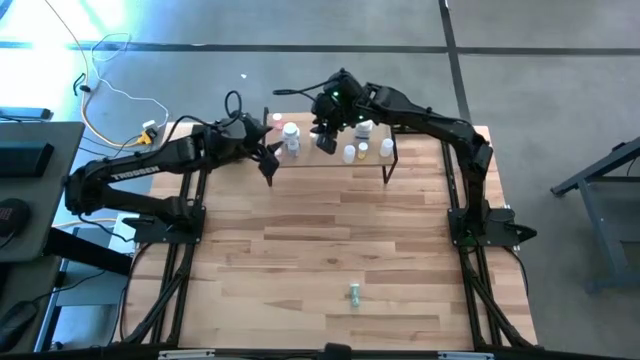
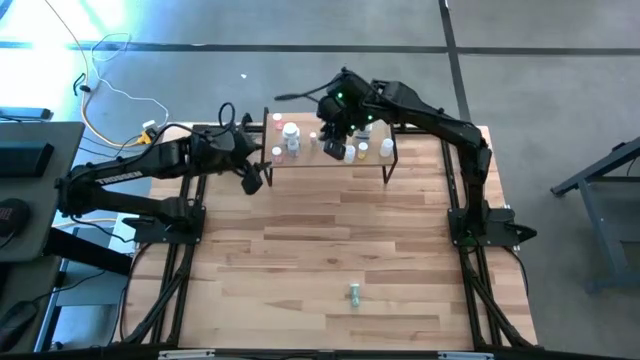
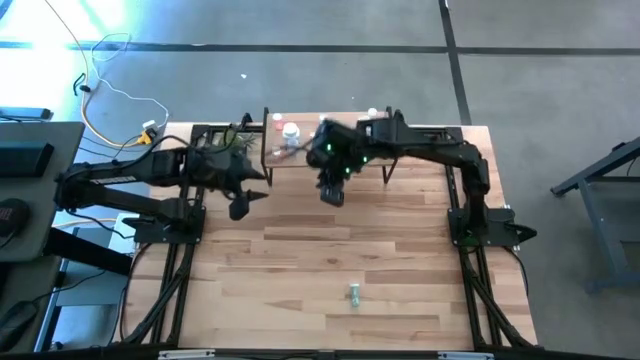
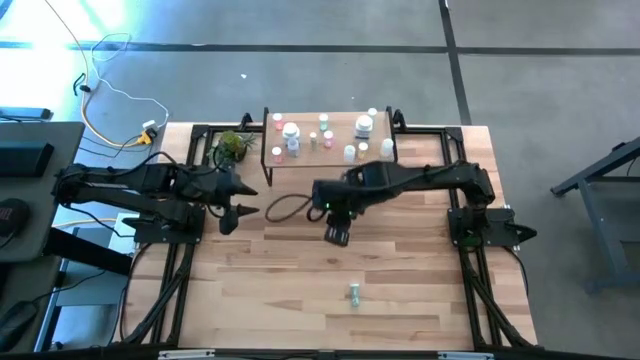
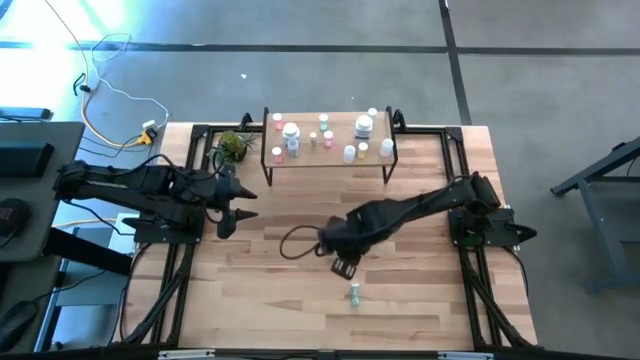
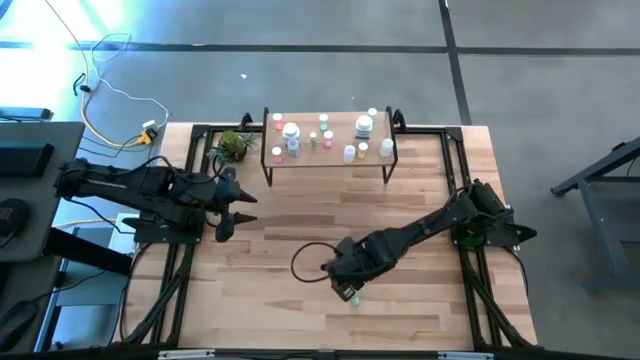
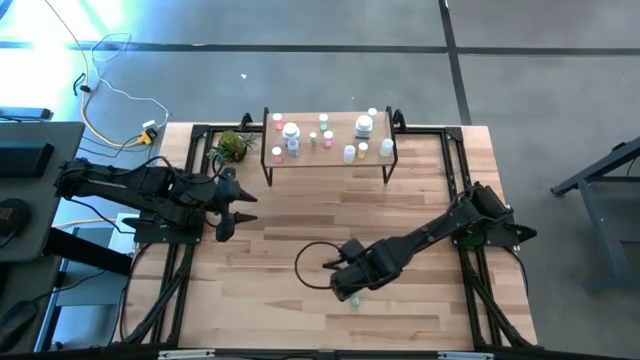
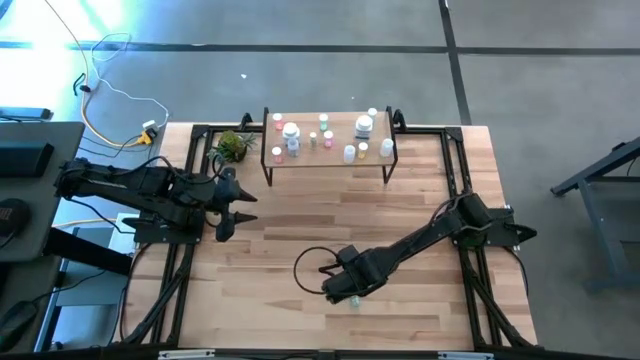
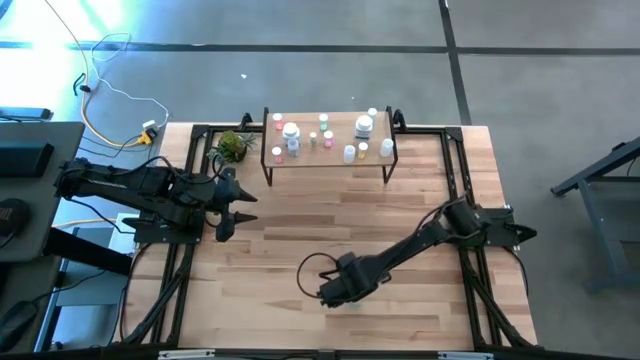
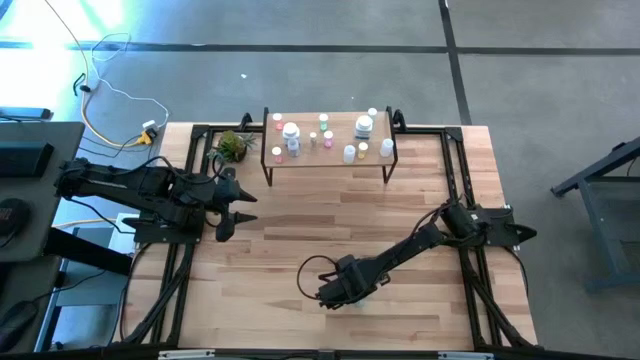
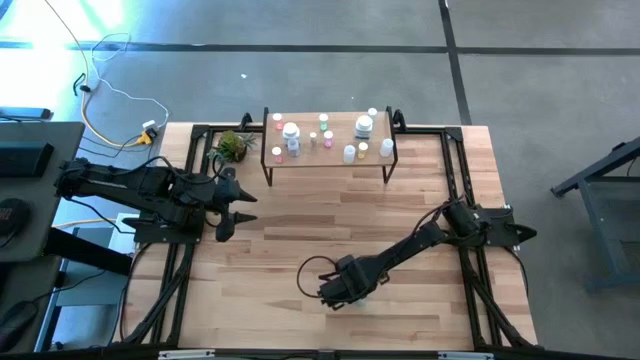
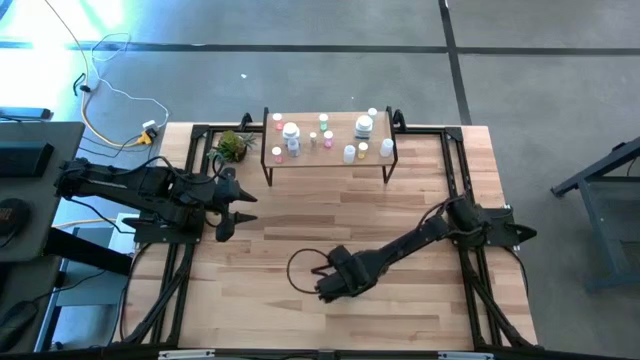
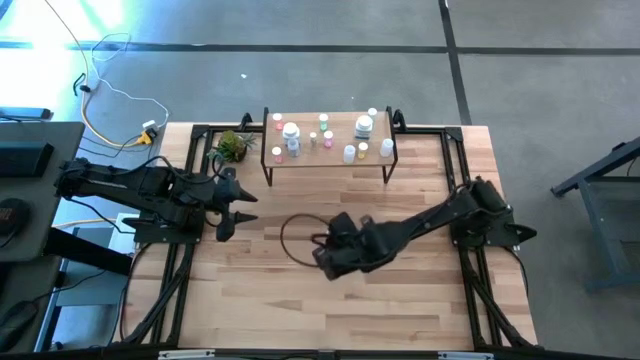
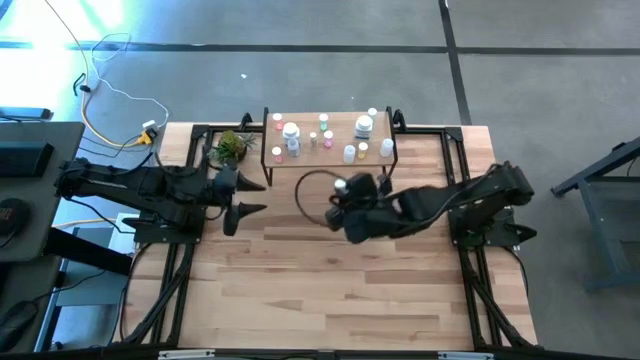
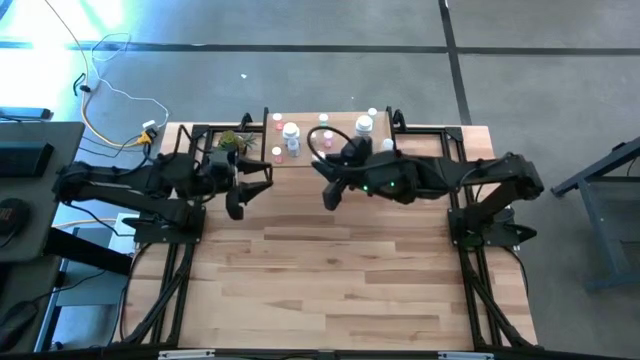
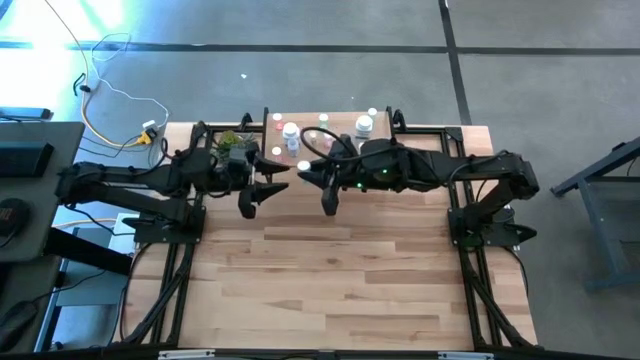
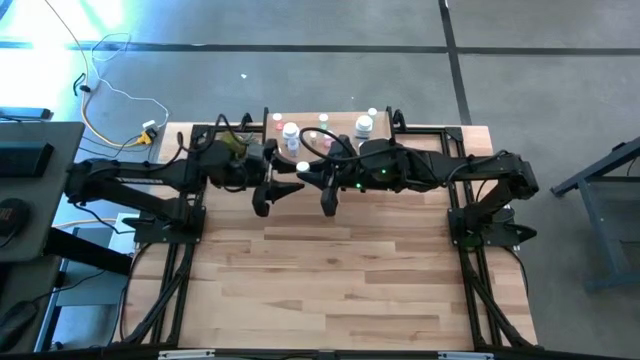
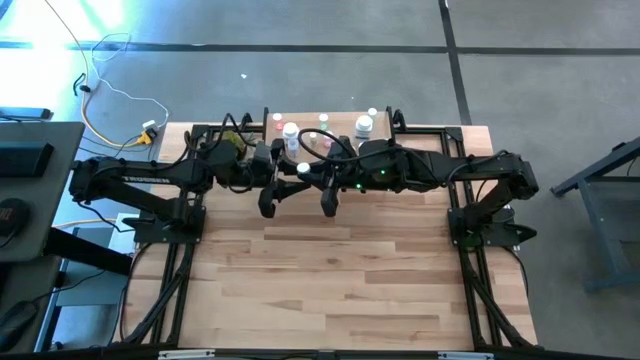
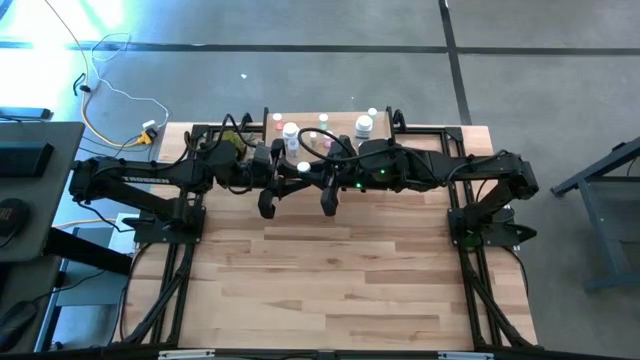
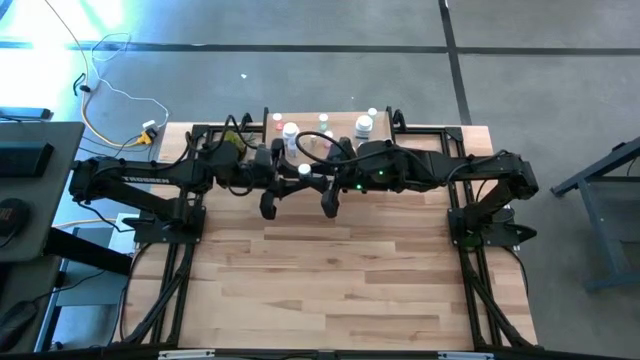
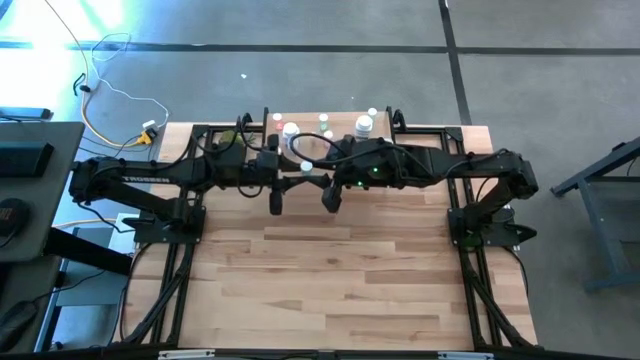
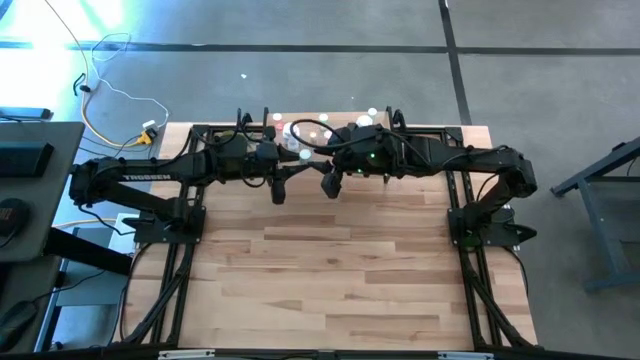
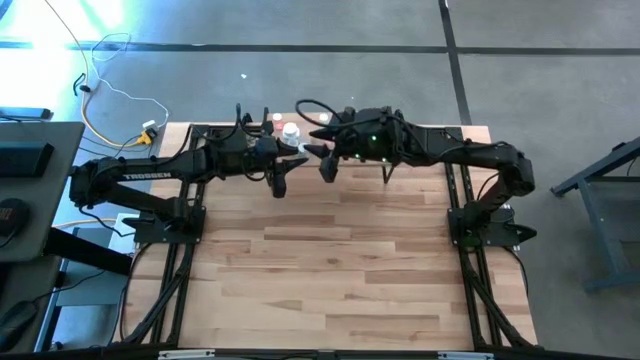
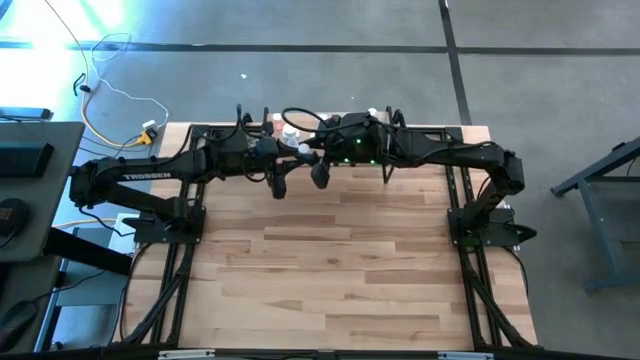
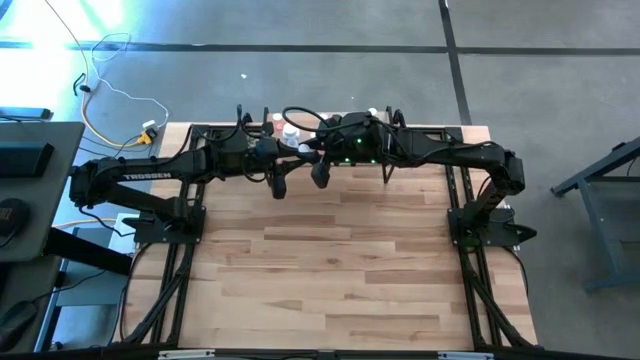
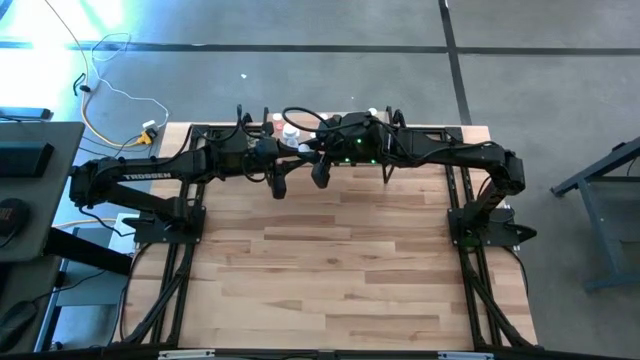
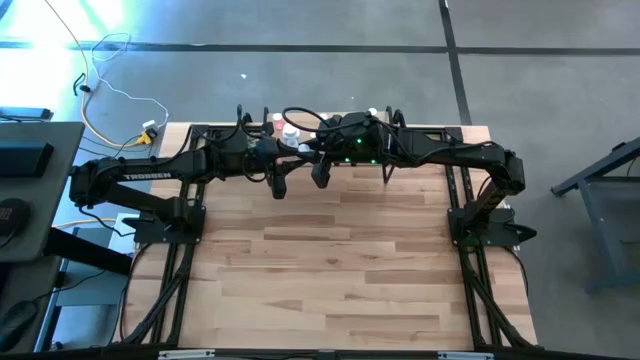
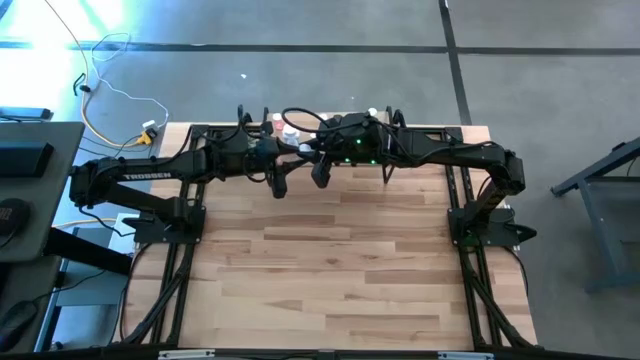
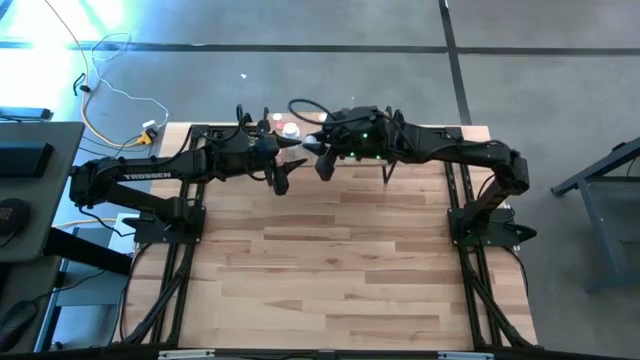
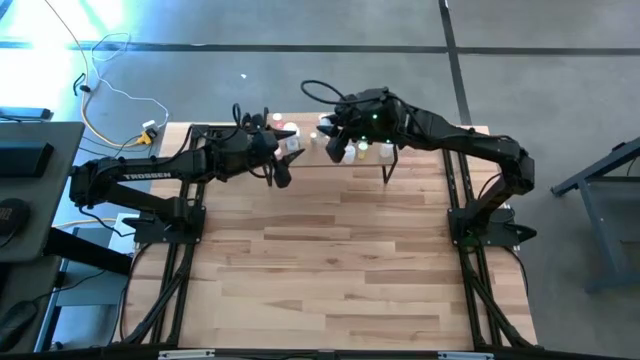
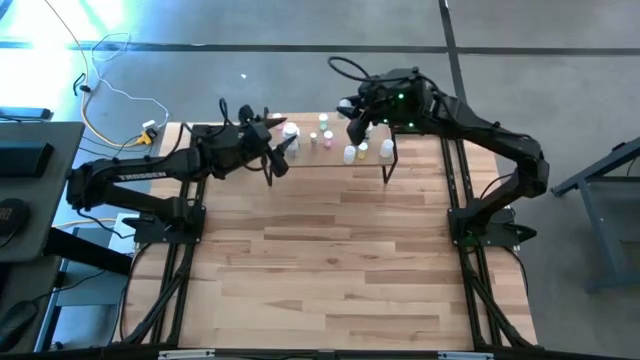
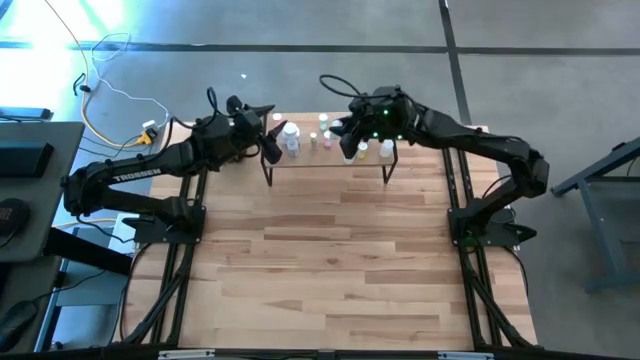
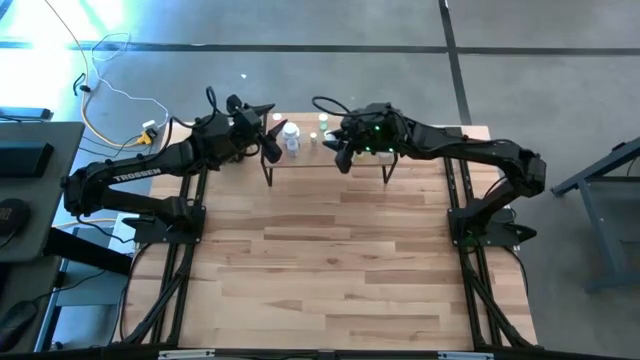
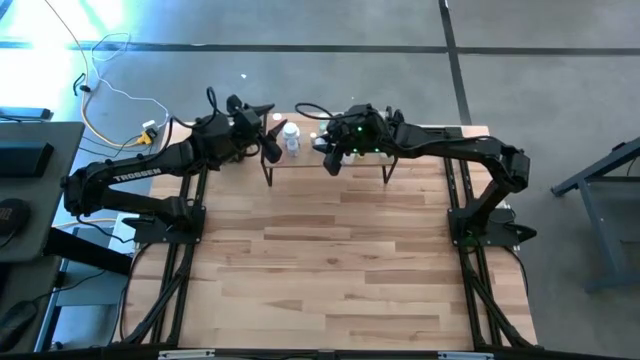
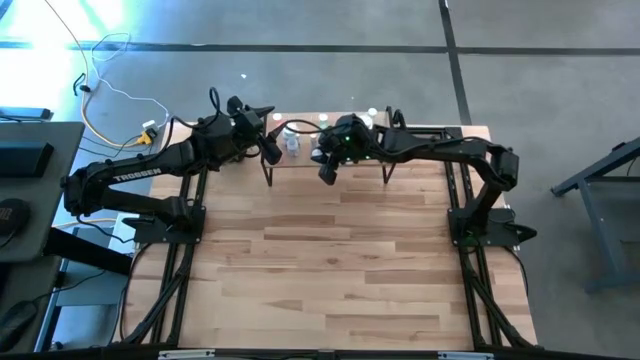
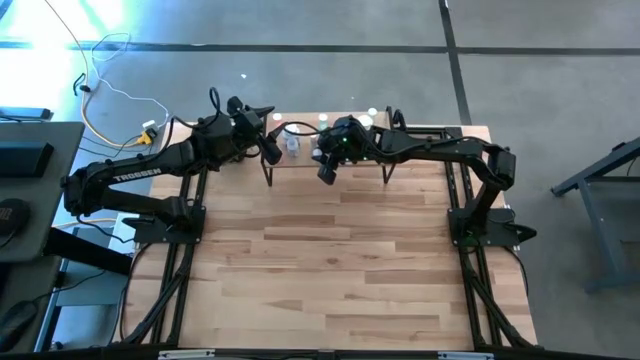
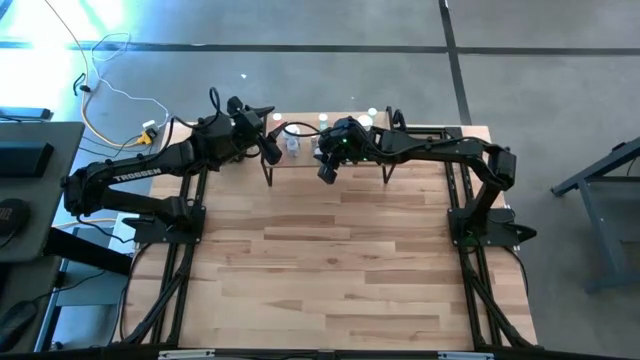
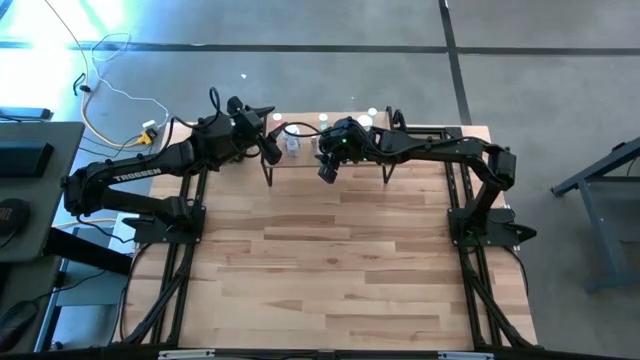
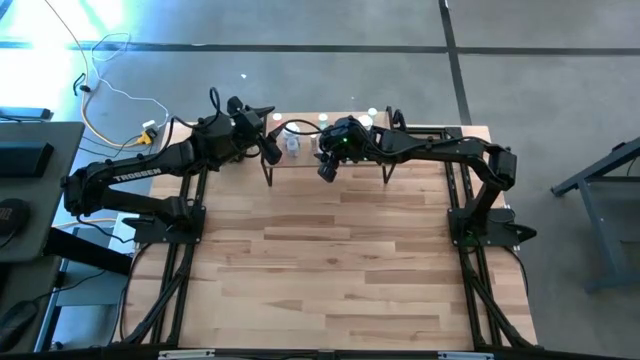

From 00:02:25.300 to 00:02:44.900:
Task: Pick and place medicine bottles onto shelf by color
Put the green pill bottle on the shelf
